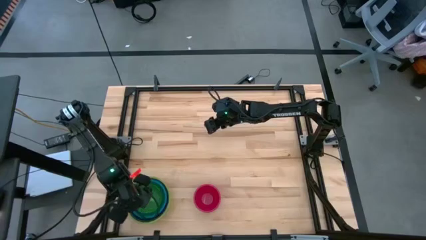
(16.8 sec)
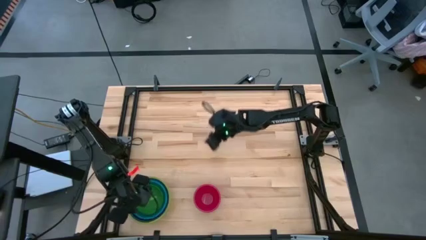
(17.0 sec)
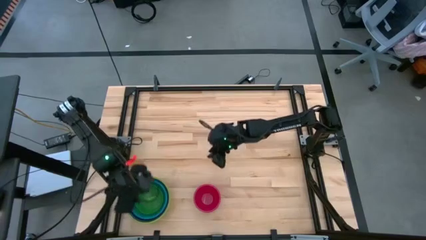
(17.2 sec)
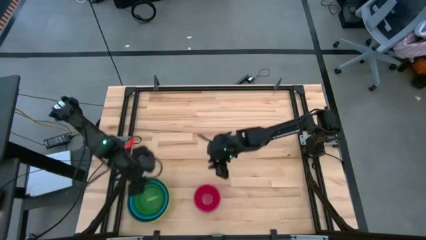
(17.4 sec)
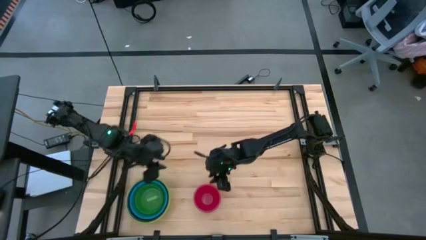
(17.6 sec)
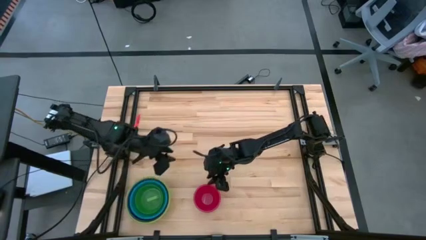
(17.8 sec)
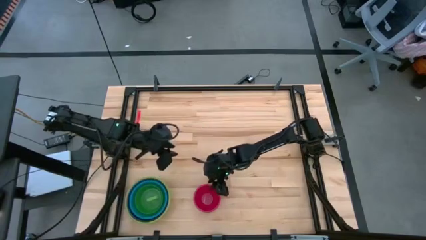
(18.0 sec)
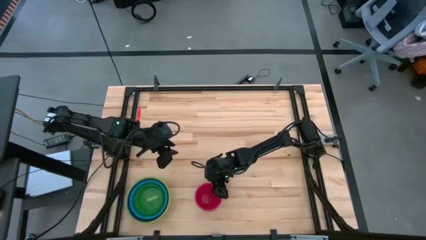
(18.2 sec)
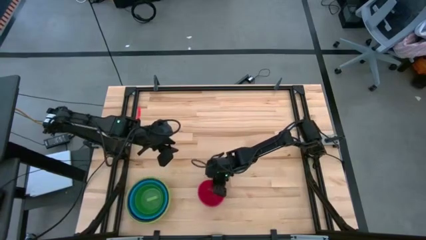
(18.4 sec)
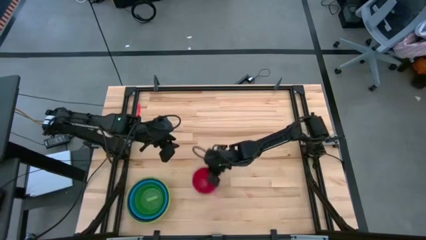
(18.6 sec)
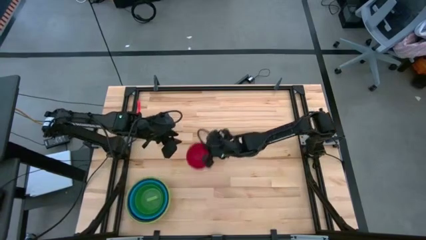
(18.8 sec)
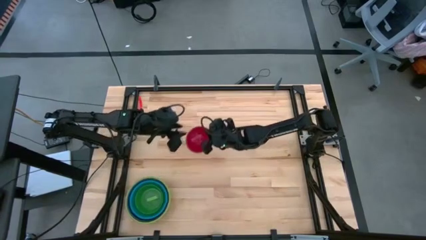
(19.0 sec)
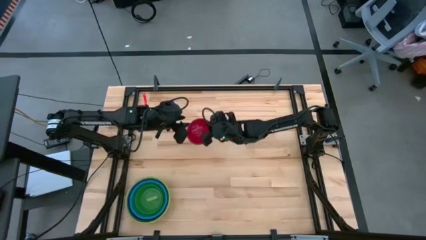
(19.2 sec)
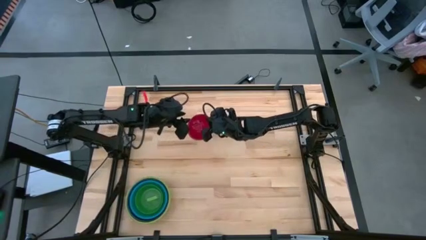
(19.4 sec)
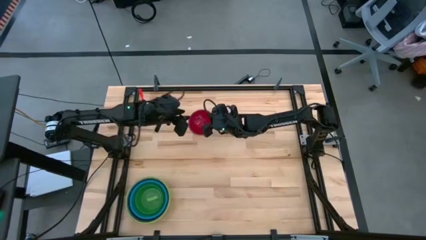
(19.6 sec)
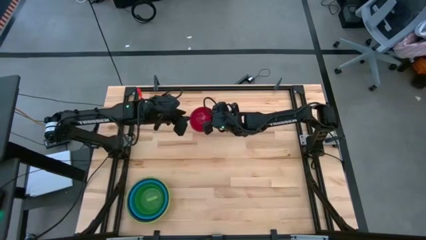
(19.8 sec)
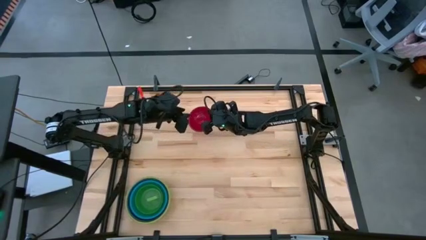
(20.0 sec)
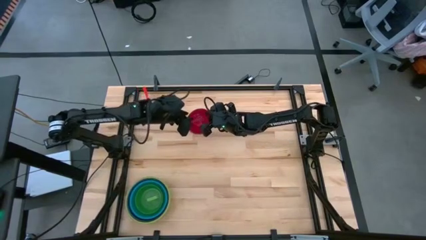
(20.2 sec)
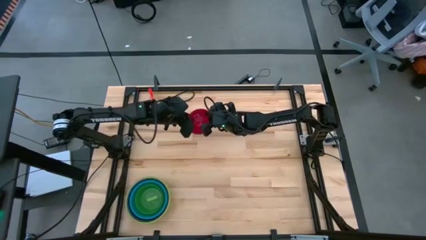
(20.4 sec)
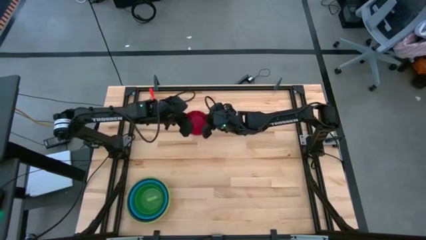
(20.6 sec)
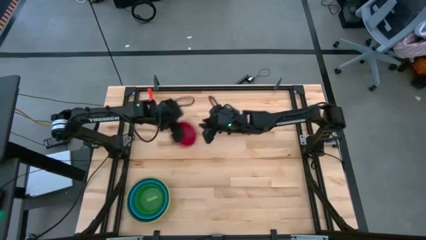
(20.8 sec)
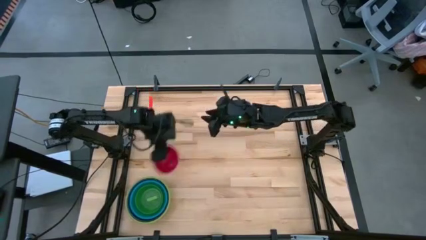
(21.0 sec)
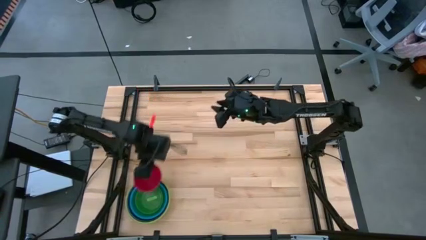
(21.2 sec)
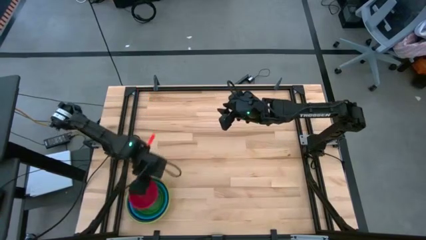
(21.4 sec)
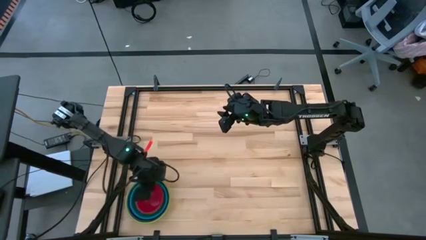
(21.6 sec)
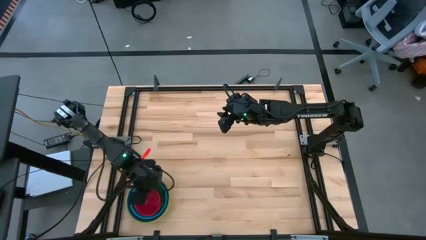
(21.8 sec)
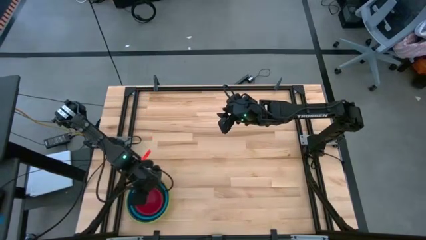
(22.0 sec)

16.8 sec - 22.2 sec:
Stack the red bowl on top of the light green bowl

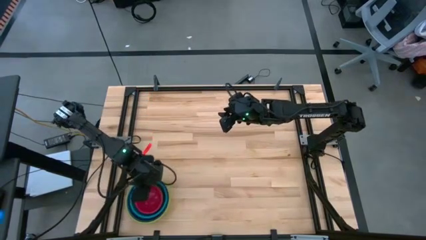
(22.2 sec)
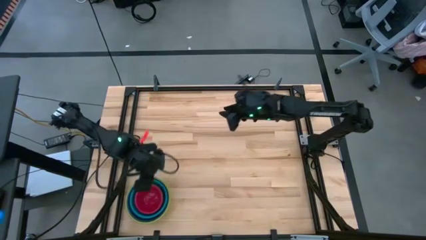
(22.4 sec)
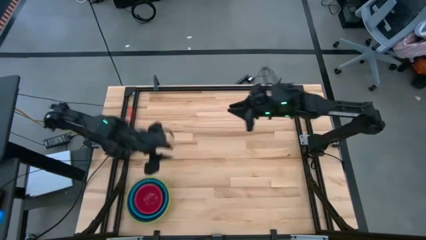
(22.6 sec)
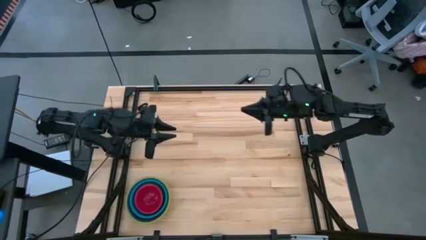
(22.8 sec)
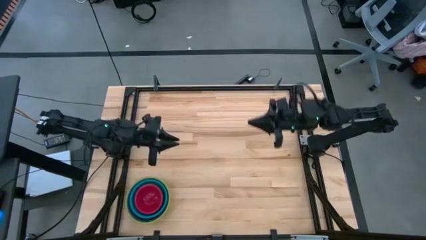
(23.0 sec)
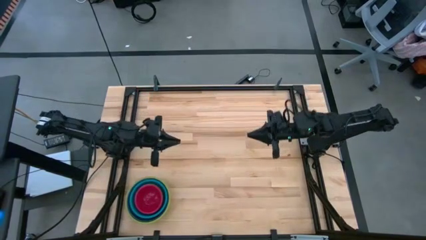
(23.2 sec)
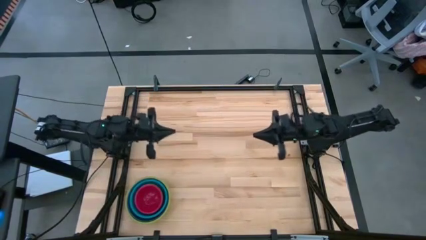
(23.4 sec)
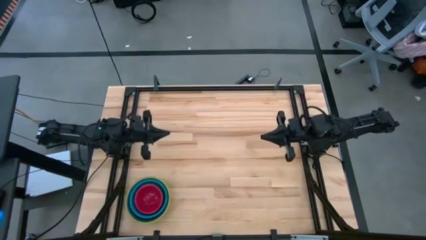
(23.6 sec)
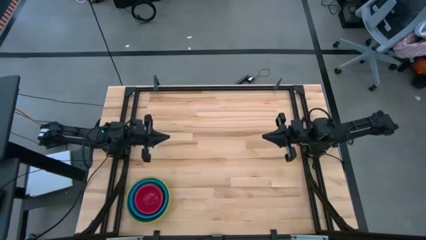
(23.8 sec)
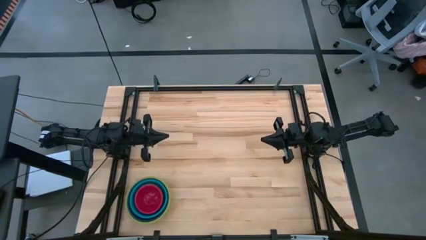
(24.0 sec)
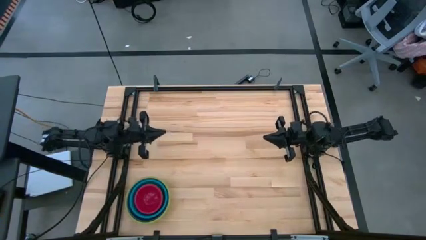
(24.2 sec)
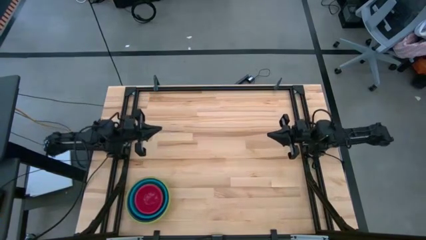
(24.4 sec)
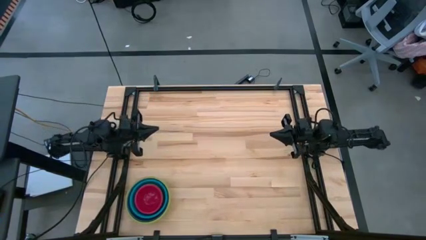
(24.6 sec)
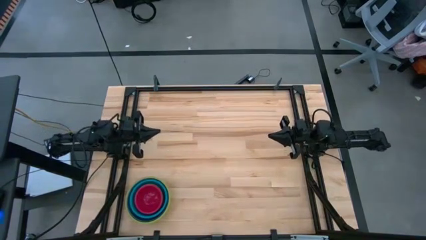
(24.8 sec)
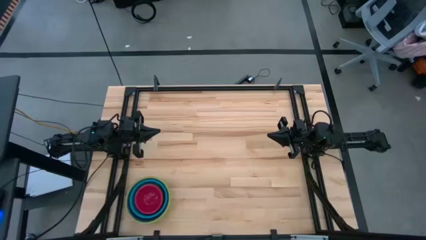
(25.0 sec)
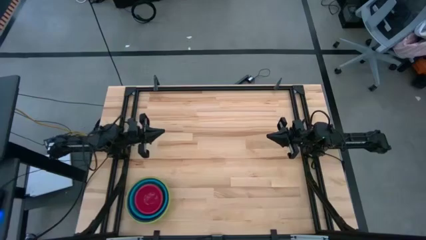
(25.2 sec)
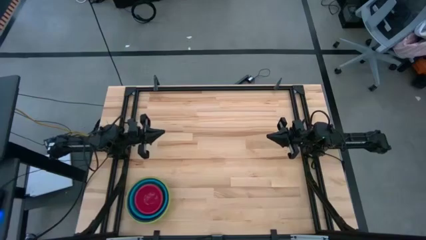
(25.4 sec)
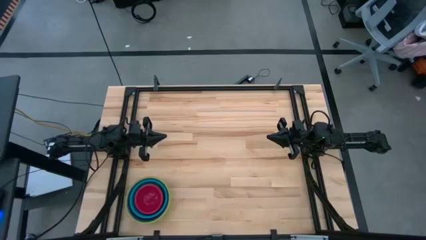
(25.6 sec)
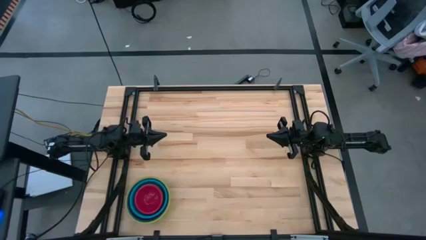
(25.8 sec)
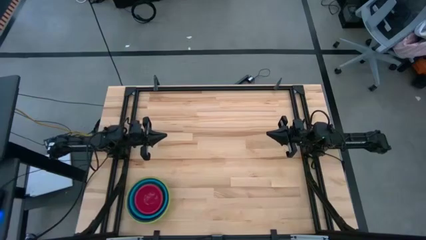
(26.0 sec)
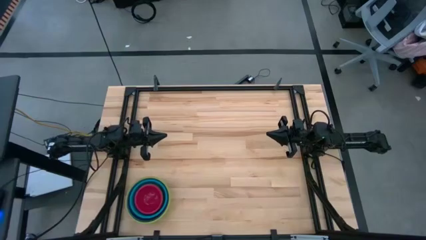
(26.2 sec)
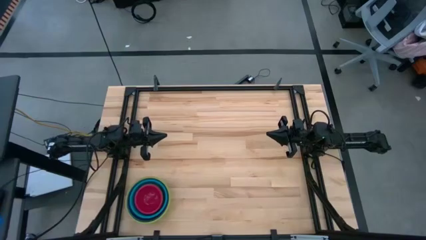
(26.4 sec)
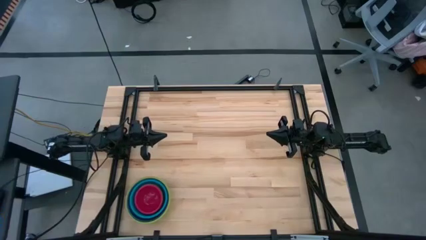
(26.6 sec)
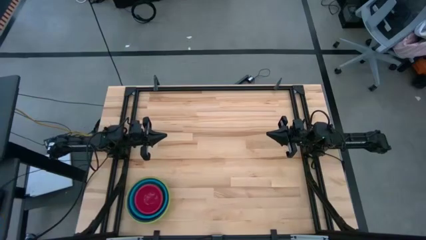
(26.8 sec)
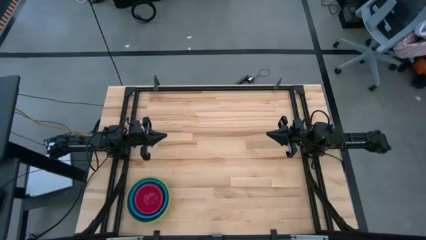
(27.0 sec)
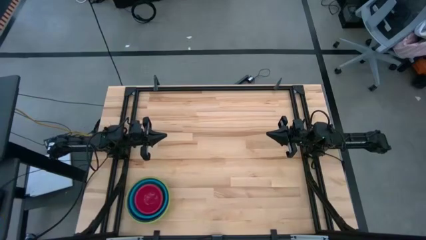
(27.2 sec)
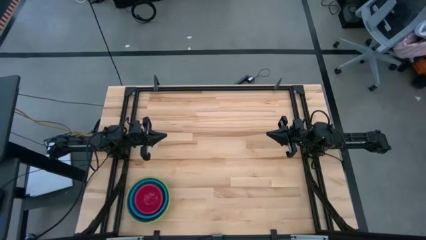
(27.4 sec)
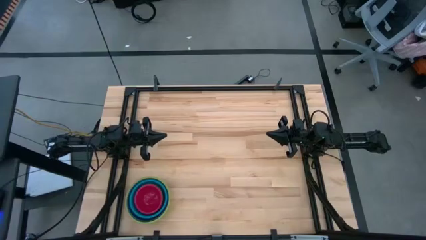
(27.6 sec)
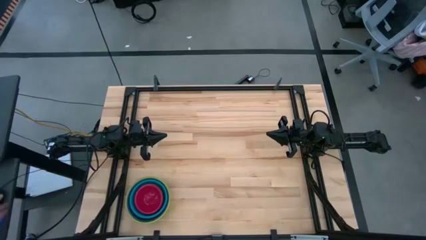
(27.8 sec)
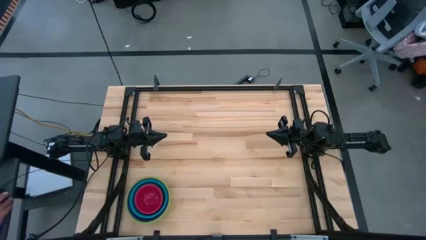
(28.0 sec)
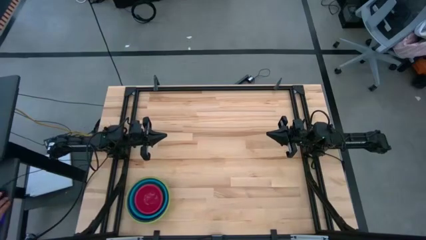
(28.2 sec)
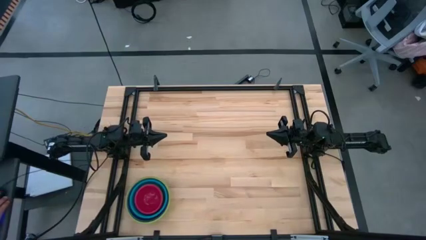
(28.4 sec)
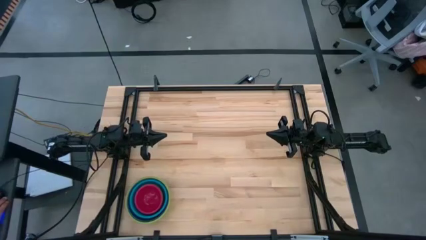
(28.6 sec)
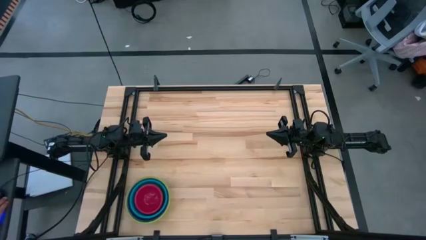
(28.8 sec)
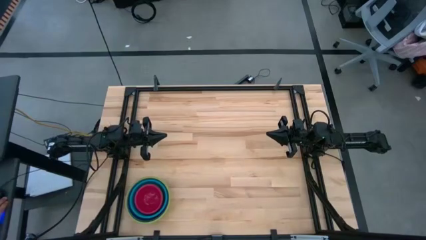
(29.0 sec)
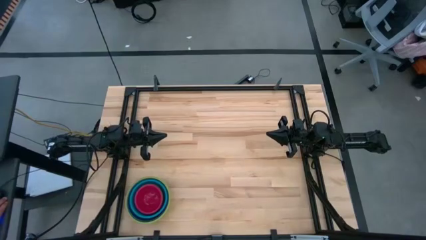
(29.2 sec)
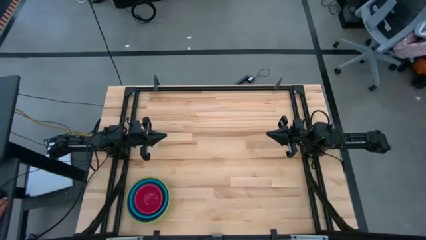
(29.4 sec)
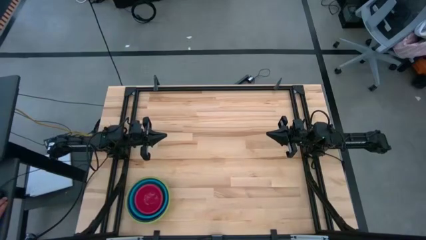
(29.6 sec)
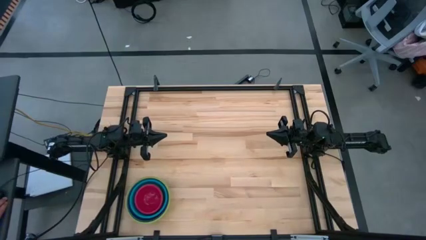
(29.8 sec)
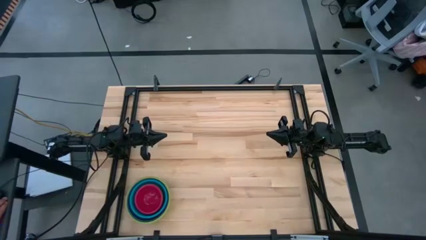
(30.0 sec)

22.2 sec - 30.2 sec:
Return to Home Position

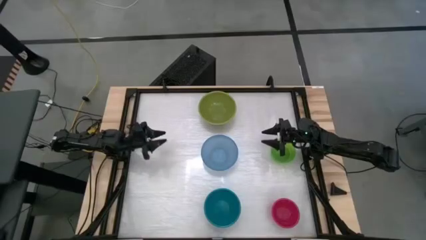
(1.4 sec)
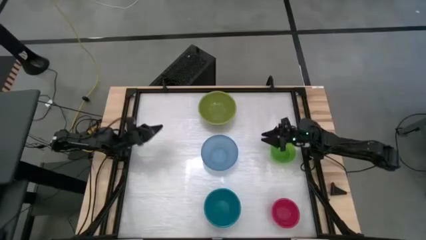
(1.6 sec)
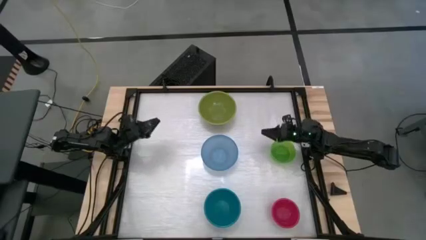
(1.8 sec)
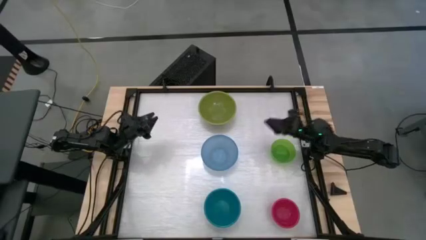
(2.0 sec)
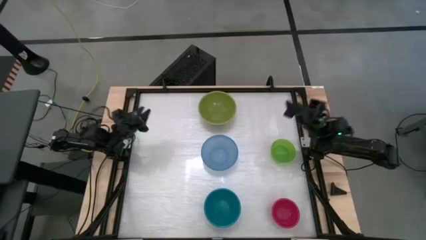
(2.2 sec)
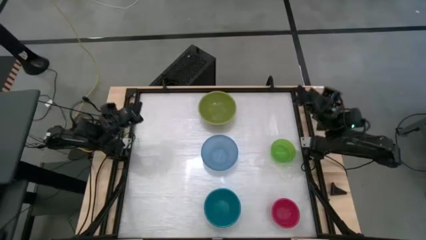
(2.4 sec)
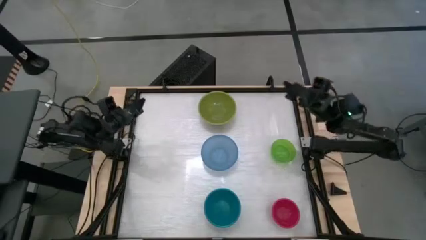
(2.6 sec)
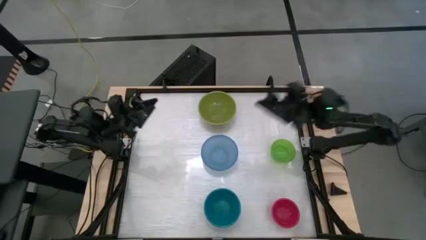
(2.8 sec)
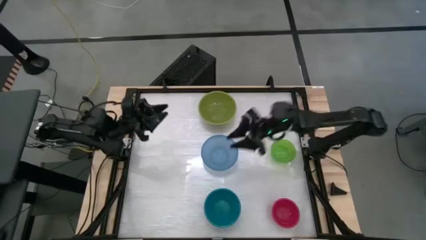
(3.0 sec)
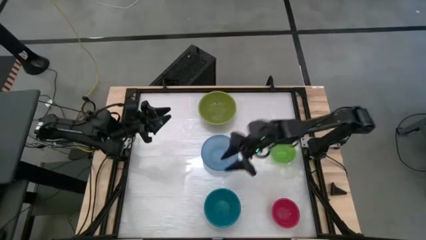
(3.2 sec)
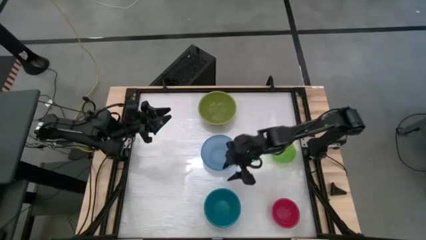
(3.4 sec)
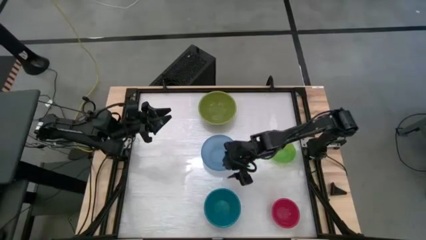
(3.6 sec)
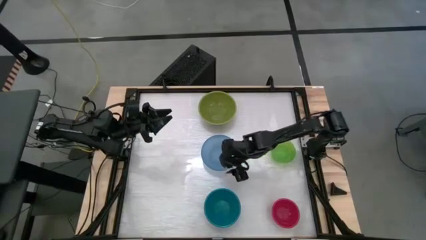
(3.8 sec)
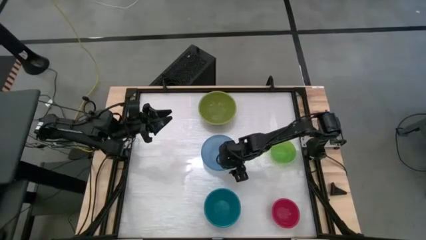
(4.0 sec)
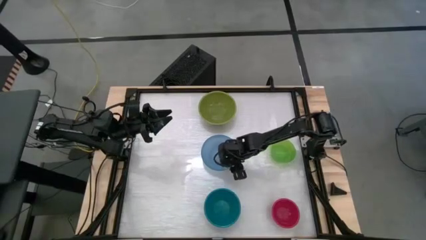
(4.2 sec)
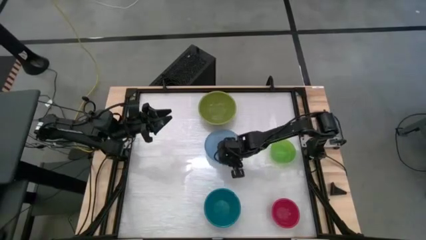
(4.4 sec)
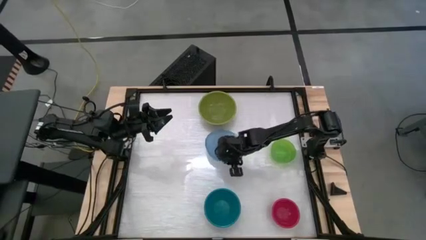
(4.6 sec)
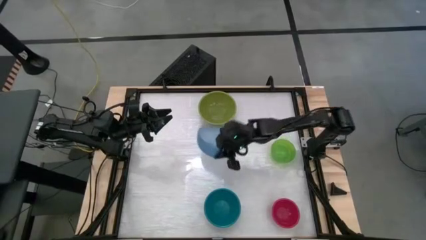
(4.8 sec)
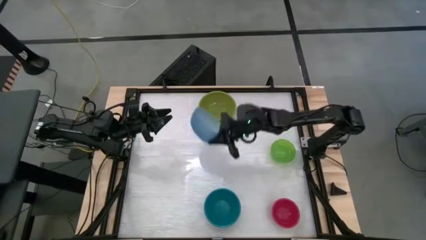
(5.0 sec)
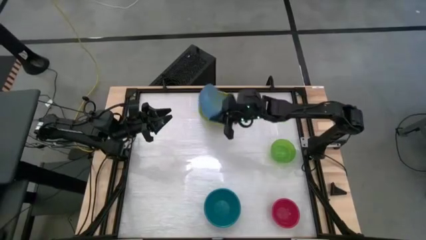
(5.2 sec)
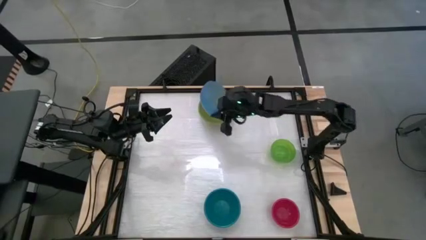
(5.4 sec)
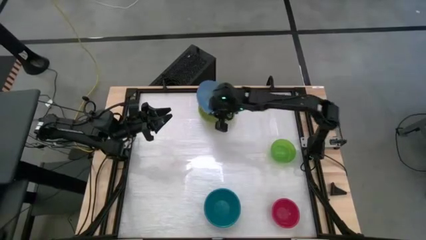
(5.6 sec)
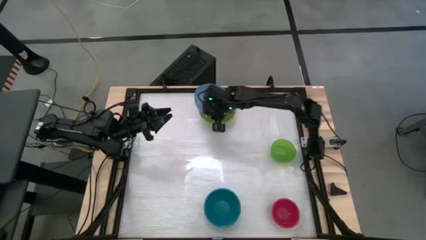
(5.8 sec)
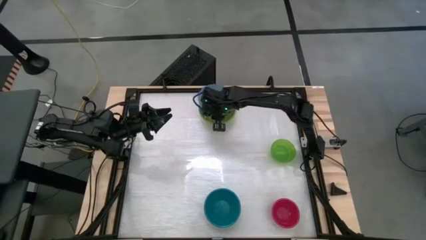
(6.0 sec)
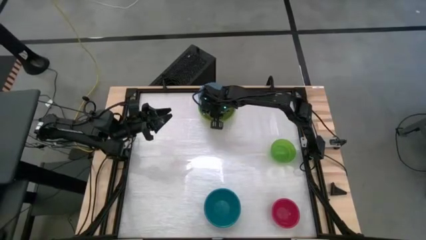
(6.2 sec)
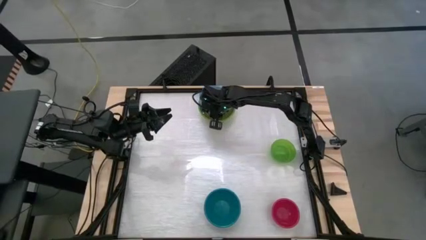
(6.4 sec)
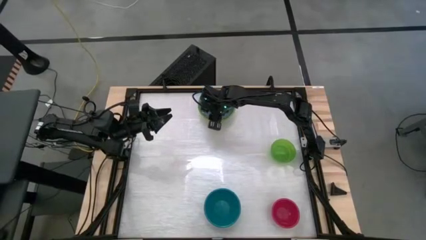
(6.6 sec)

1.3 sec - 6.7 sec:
Stack the light blue bowl on top of the dark green bowl
